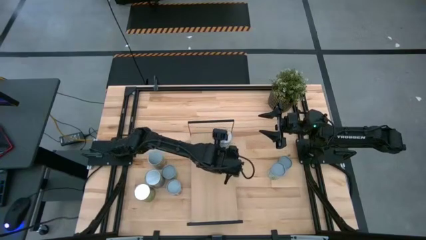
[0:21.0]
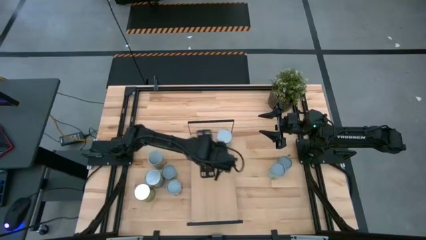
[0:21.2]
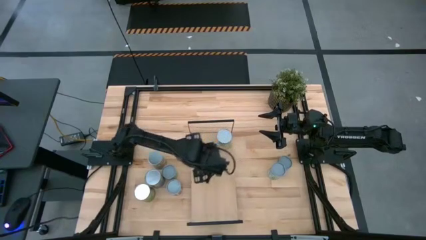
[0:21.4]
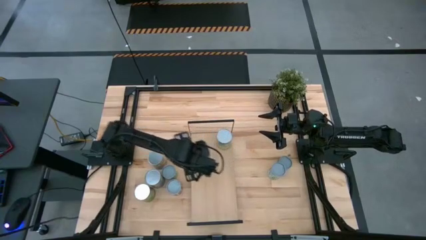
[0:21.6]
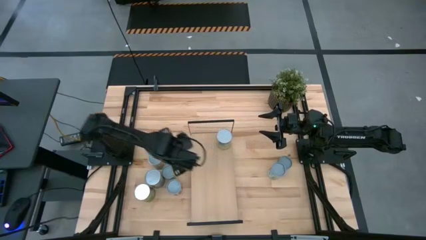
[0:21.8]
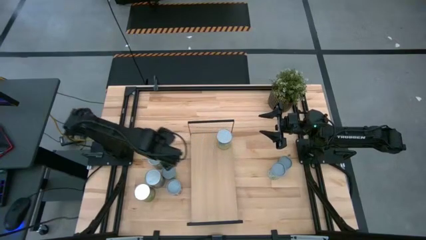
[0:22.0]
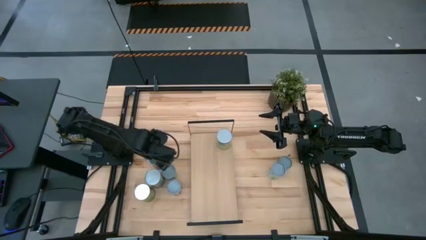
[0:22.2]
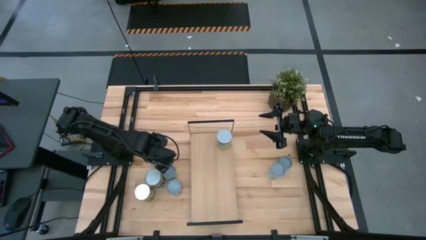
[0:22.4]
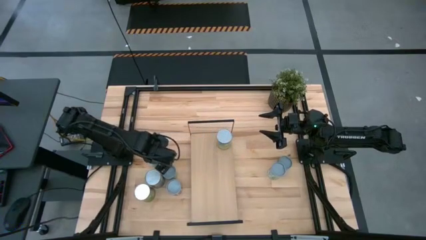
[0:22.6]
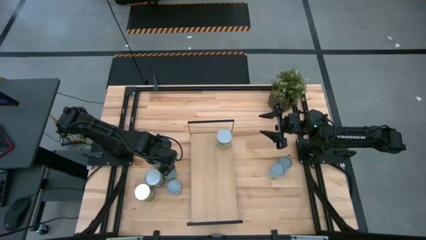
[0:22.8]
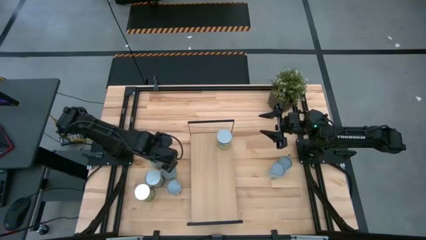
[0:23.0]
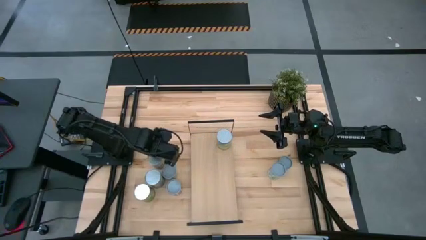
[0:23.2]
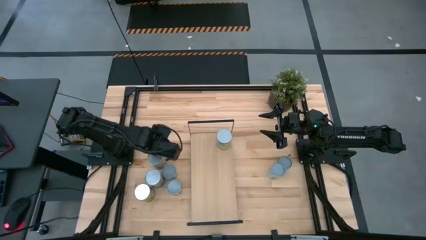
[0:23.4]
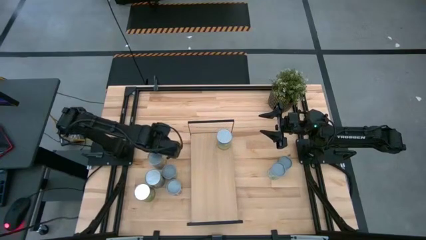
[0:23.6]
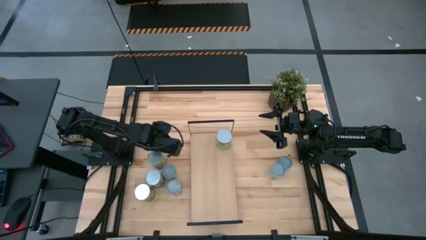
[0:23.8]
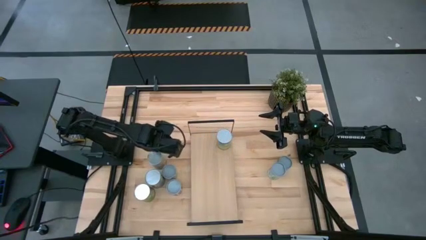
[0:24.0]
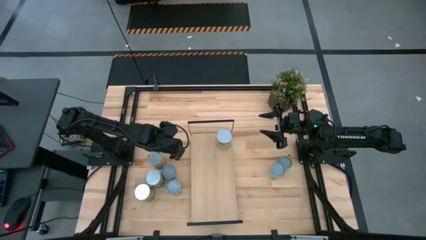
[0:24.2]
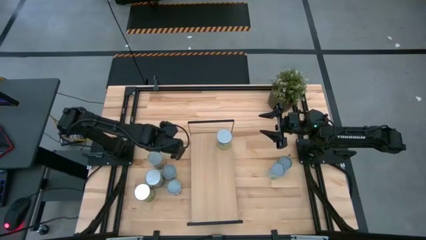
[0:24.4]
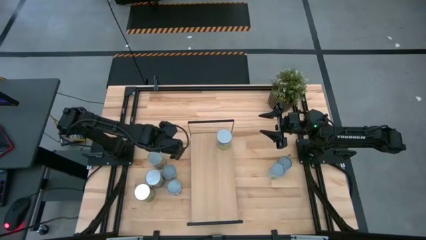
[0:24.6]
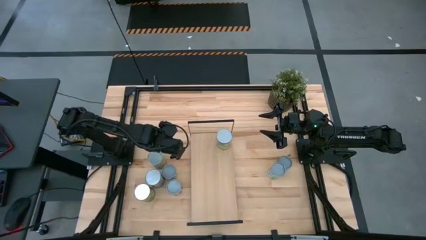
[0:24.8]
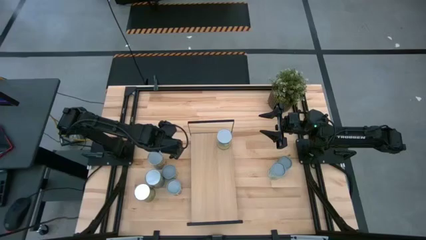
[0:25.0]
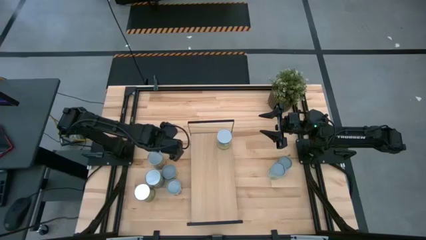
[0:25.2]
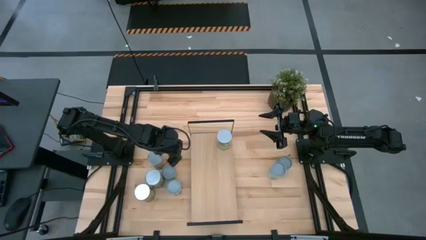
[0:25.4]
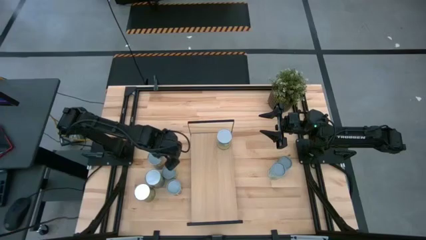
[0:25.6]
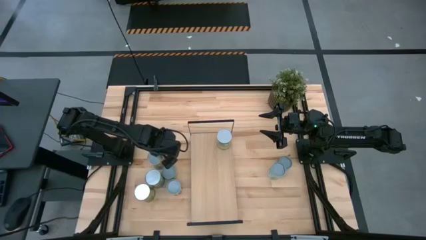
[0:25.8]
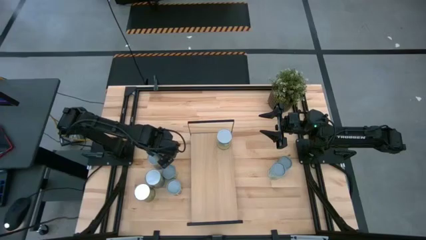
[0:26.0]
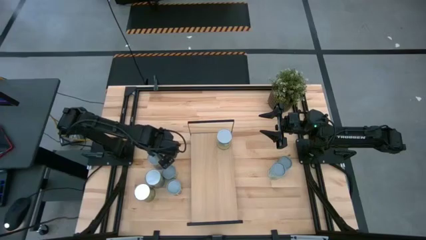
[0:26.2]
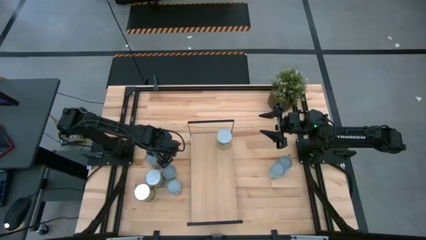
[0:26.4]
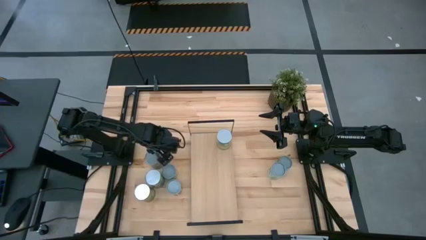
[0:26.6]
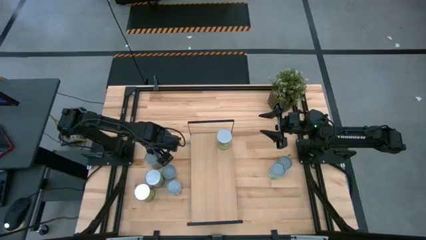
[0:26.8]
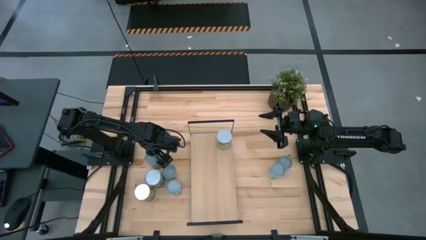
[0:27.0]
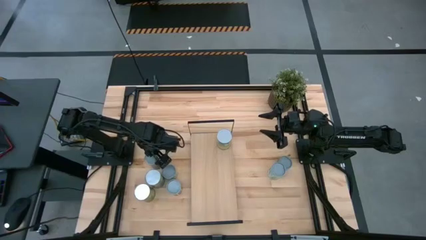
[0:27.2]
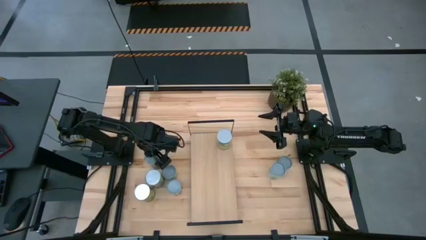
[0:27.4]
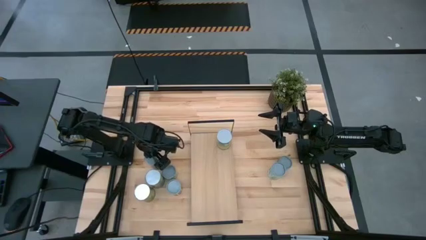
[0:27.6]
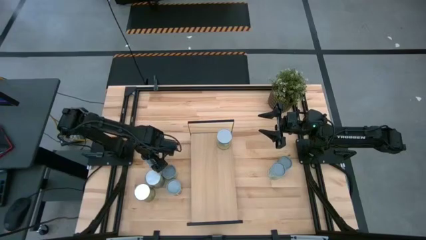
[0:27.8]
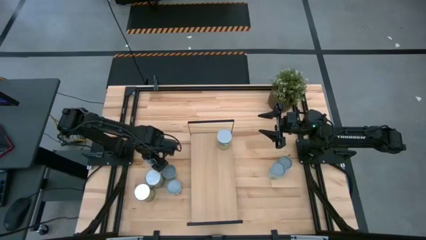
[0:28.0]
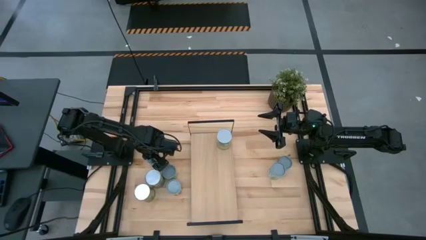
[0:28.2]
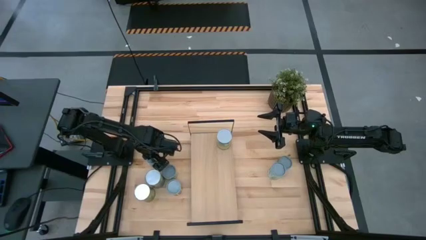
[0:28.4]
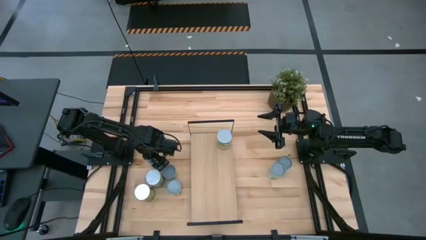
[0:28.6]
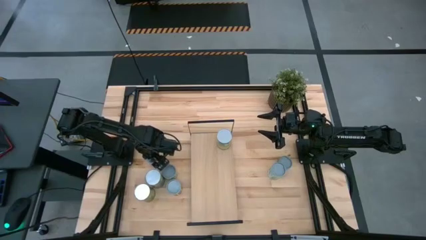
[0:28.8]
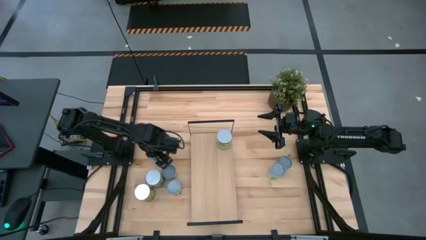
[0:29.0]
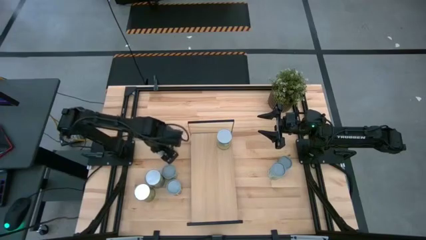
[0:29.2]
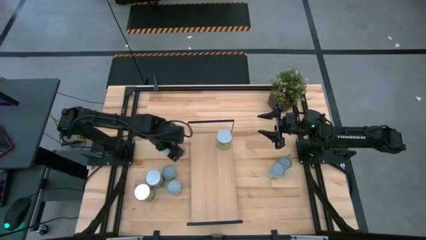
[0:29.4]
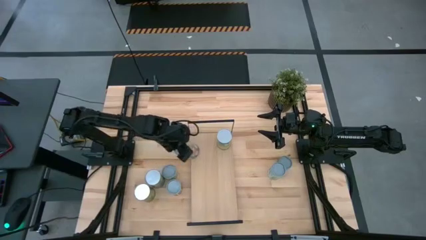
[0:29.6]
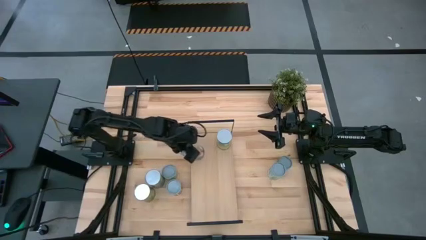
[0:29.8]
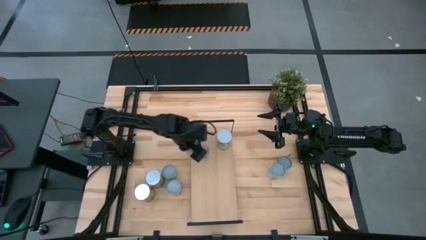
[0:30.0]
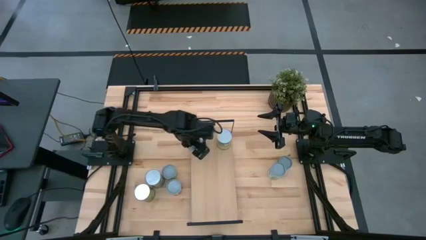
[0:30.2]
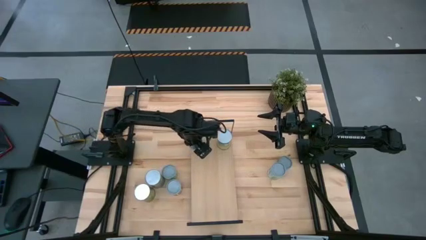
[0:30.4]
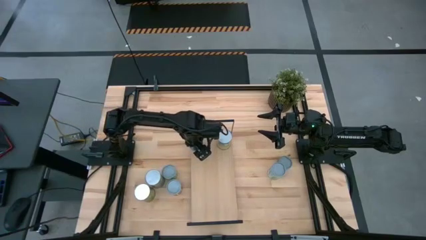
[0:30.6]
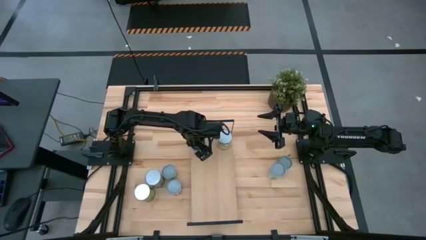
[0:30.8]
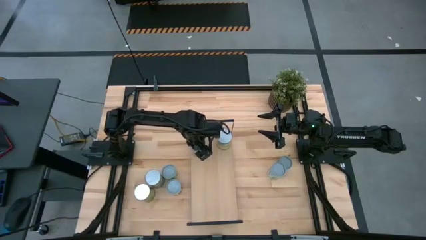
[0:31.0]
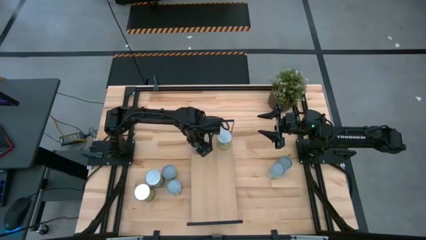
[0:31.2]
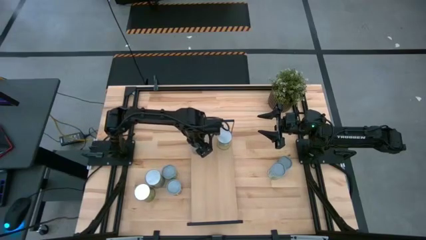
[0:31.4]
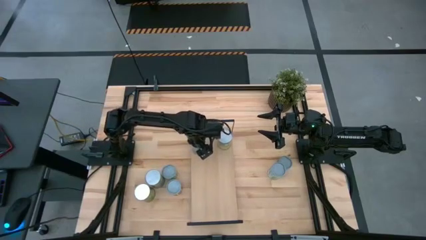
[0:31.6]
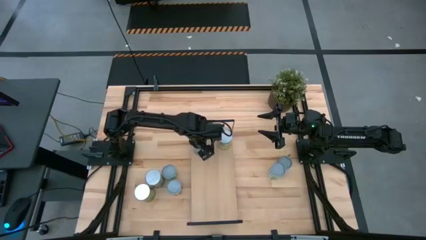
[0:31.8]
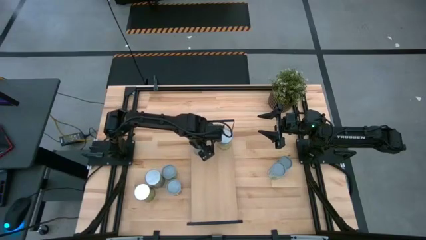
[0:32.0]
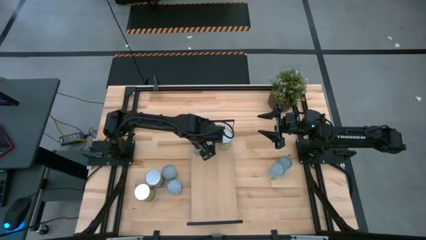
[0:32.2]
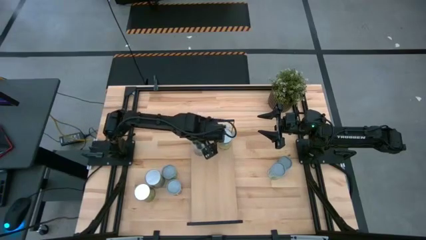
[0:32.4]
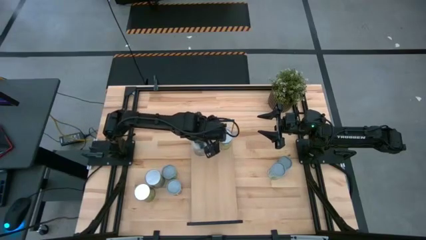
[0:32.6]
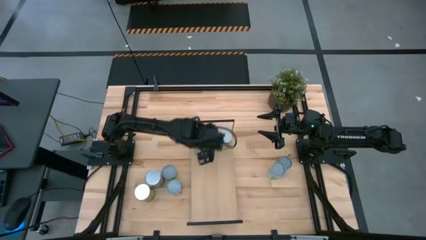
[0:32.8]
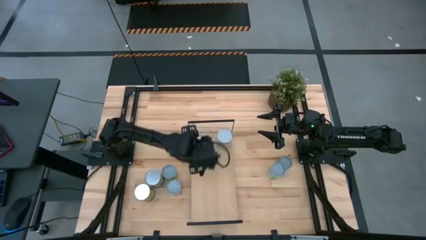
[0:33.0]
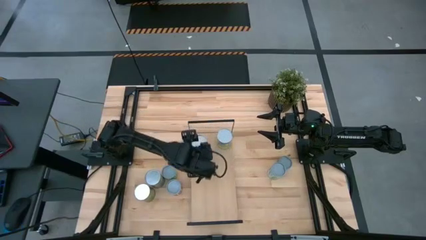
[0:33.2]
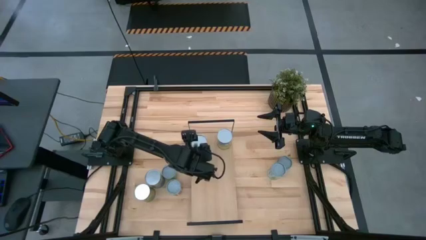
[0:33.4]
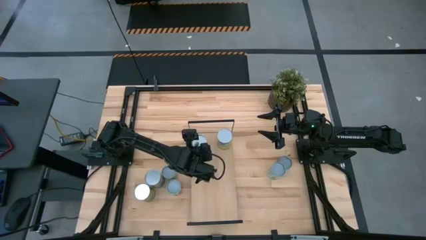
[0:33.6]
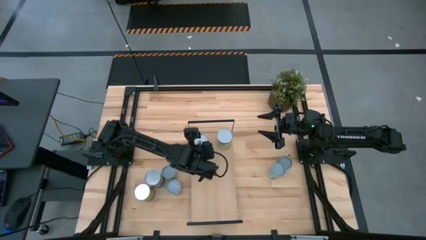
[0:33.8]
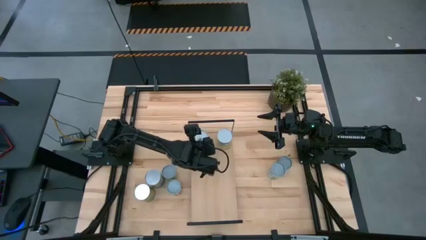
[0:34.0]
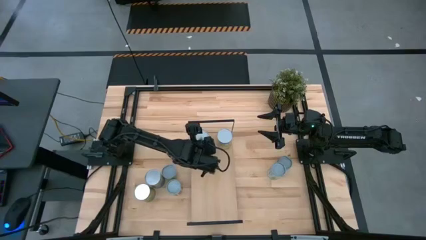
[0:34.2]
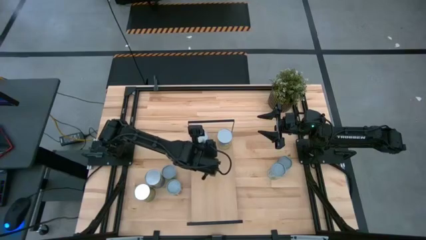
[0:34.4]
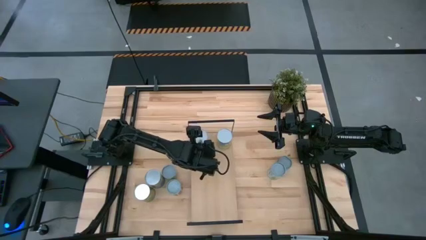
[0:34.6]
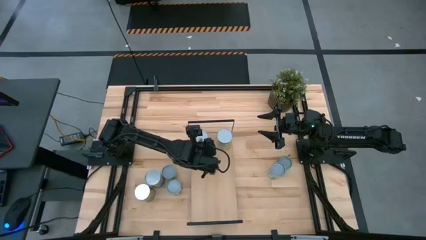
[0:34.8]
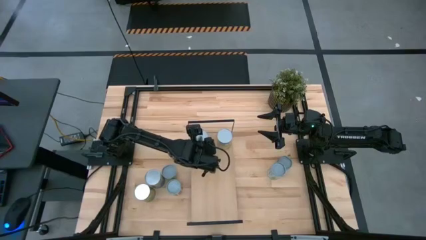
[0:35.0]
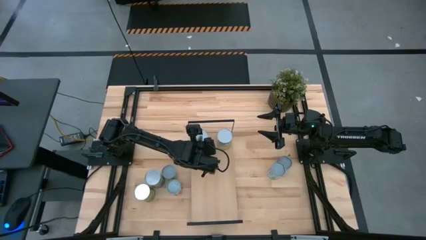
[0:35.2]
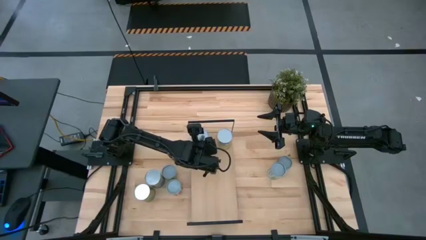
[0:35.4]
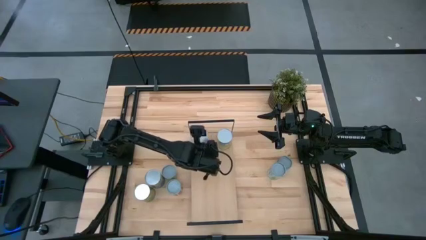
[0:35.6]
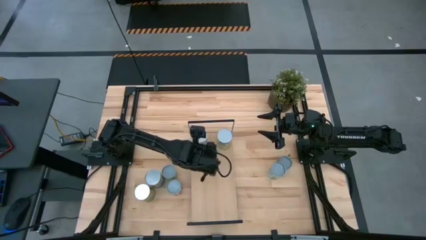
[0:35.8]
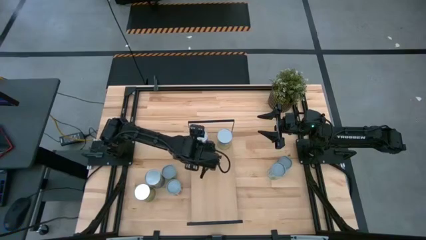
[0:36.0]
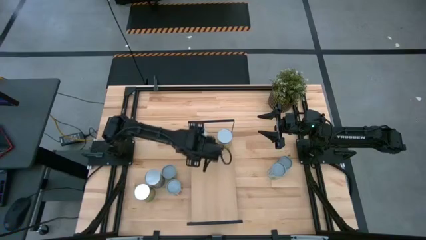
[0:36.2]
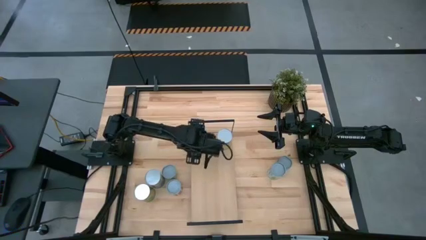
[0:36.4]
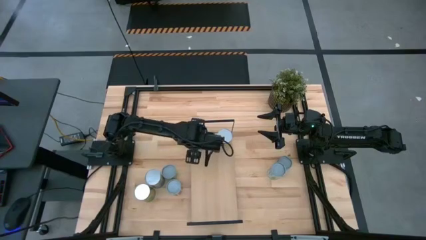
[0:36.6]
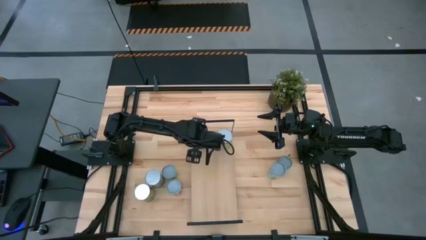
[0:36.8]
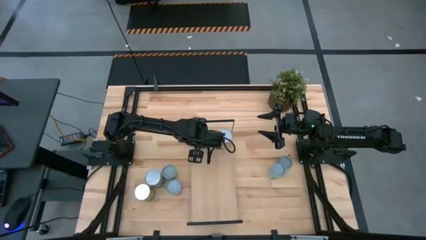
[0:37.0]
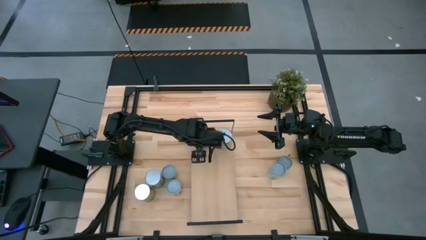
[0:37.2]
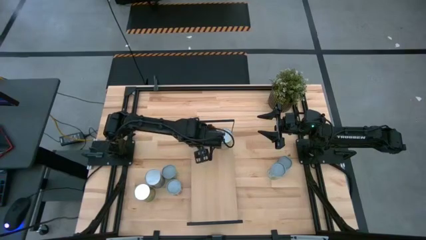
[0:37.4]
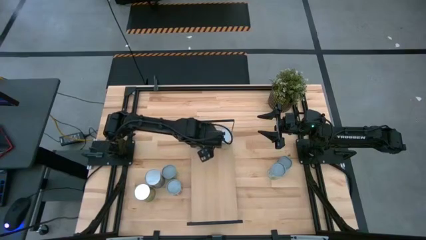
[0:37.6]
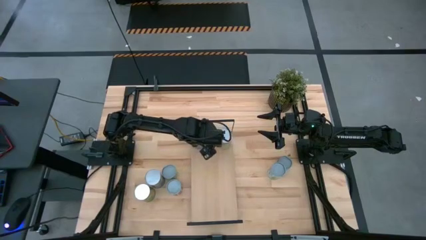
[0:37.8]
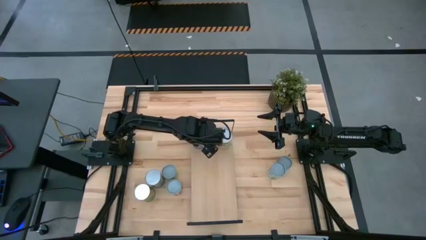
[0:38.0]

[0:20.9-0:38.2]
Task: Pick and place cans onto a shelf
Put the large canned peaches on the shelf
